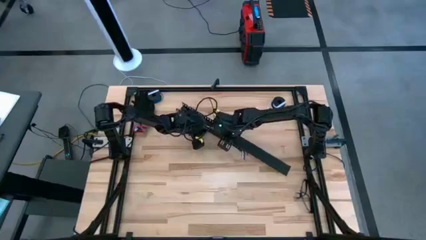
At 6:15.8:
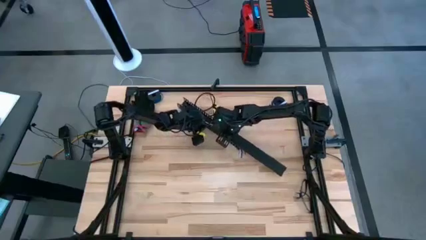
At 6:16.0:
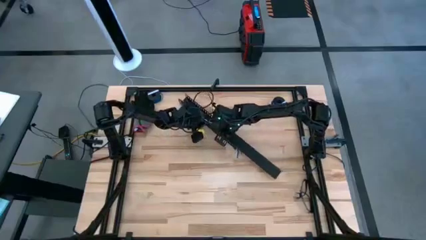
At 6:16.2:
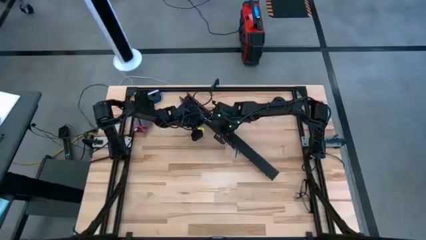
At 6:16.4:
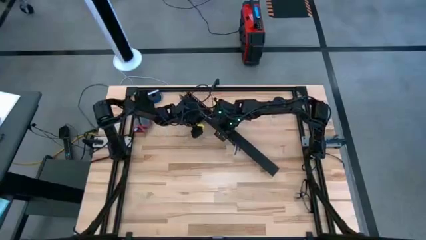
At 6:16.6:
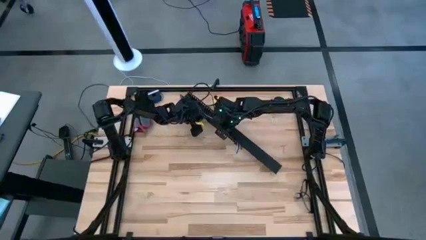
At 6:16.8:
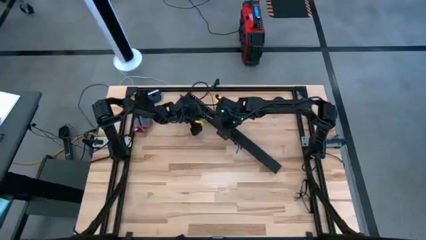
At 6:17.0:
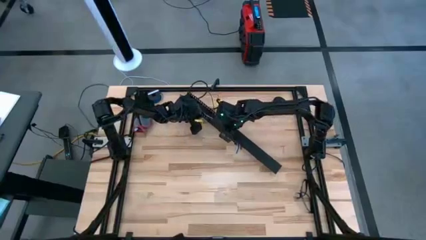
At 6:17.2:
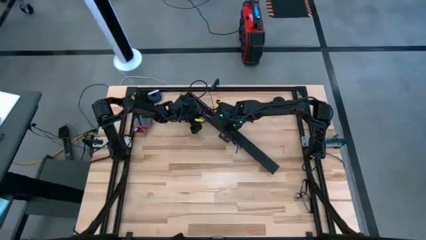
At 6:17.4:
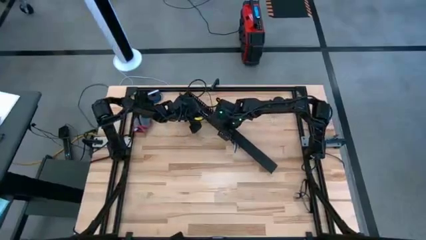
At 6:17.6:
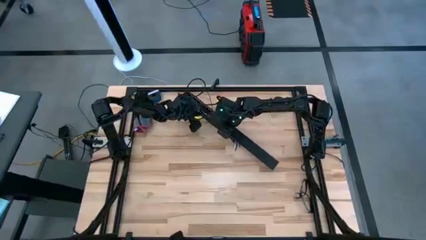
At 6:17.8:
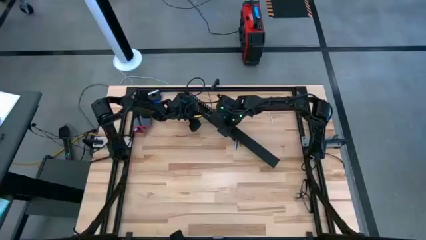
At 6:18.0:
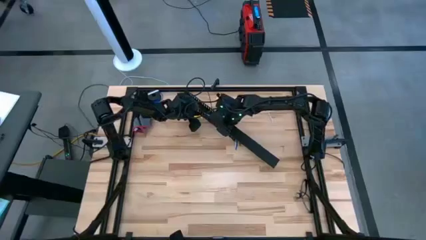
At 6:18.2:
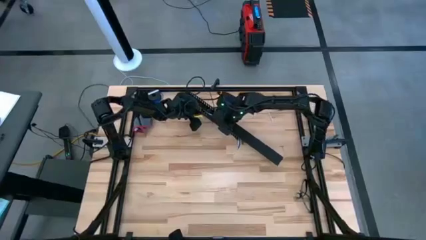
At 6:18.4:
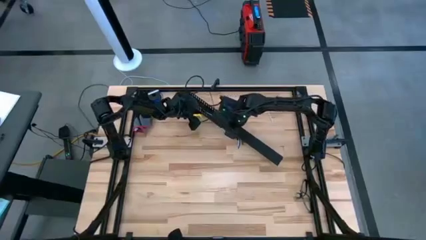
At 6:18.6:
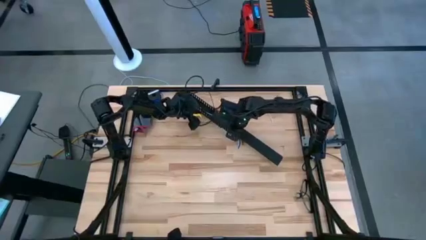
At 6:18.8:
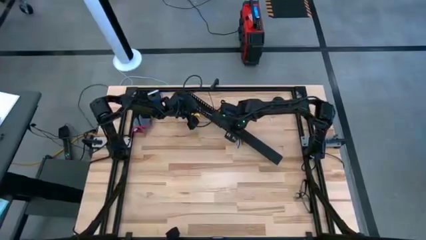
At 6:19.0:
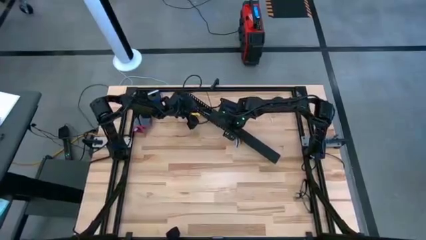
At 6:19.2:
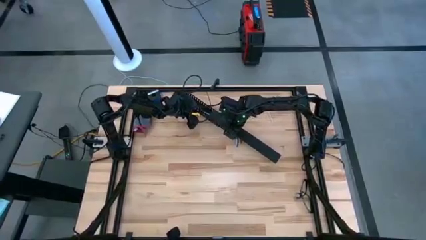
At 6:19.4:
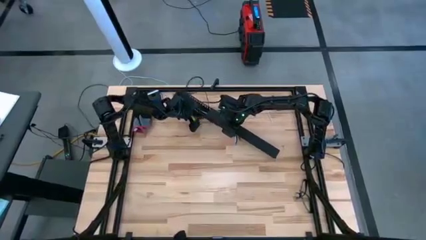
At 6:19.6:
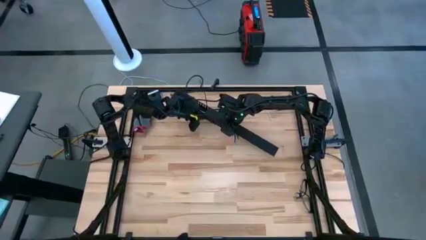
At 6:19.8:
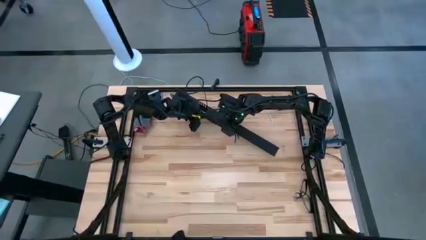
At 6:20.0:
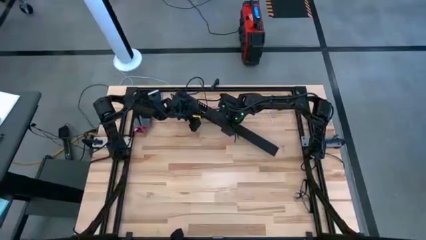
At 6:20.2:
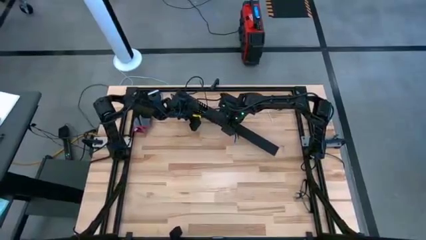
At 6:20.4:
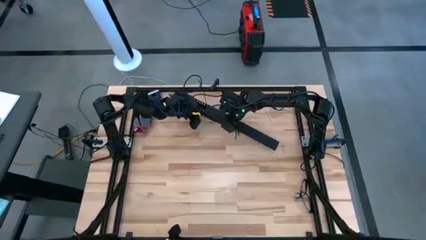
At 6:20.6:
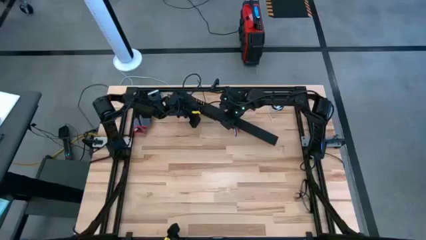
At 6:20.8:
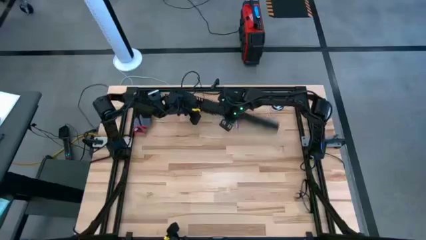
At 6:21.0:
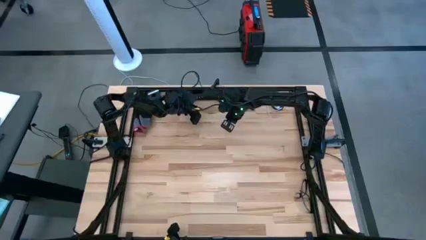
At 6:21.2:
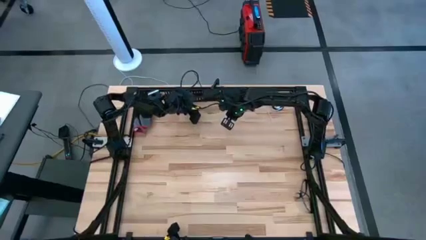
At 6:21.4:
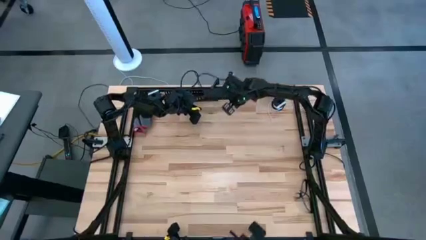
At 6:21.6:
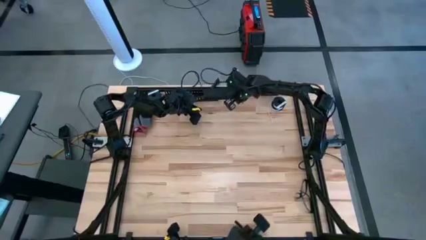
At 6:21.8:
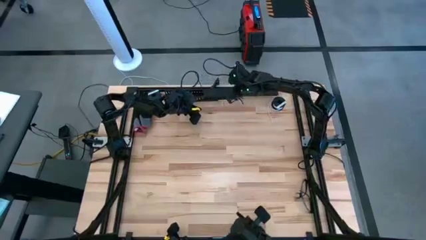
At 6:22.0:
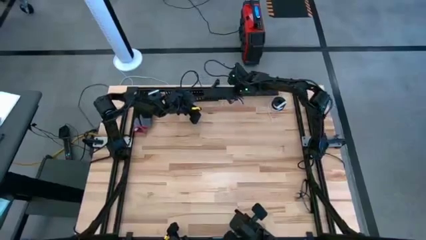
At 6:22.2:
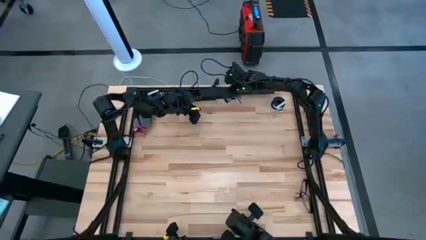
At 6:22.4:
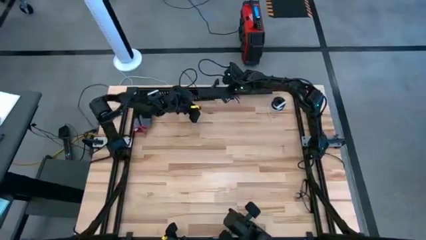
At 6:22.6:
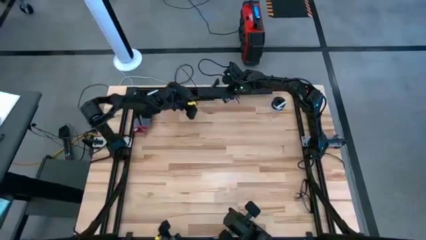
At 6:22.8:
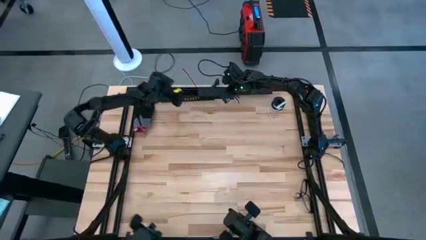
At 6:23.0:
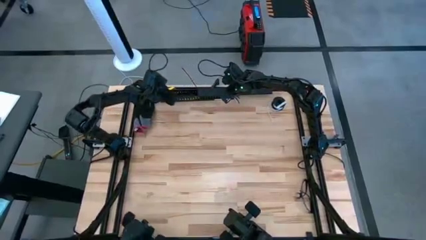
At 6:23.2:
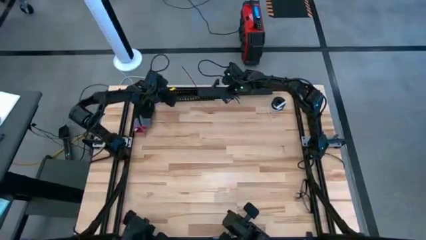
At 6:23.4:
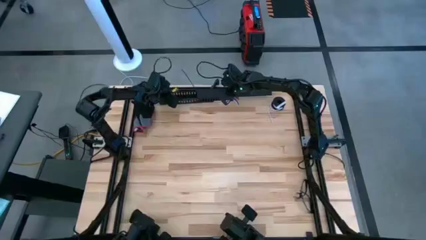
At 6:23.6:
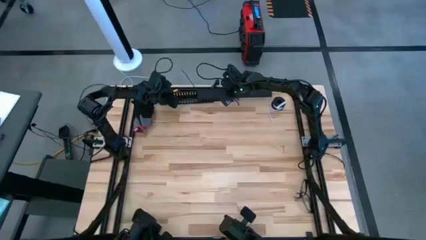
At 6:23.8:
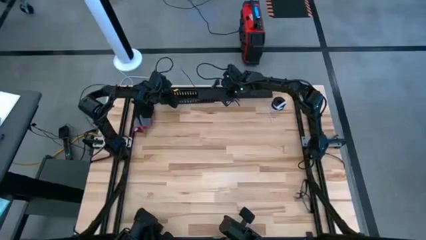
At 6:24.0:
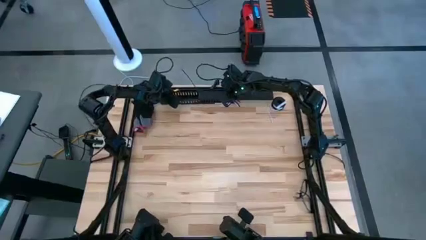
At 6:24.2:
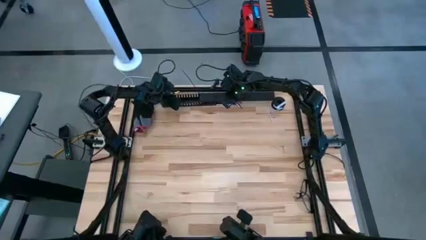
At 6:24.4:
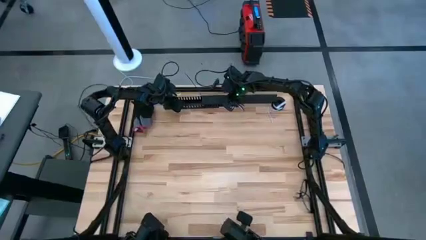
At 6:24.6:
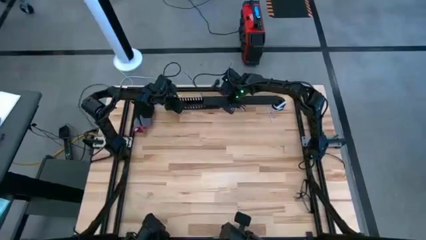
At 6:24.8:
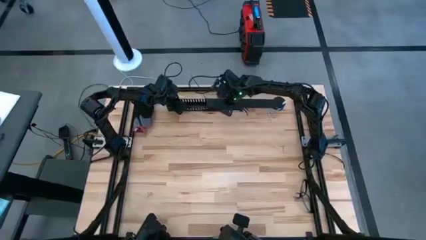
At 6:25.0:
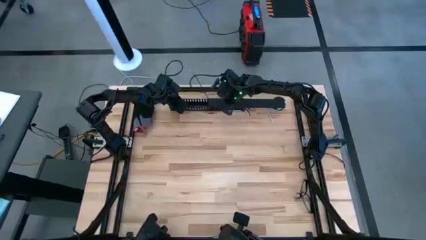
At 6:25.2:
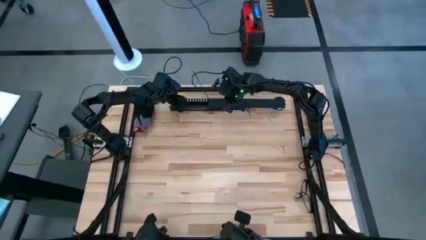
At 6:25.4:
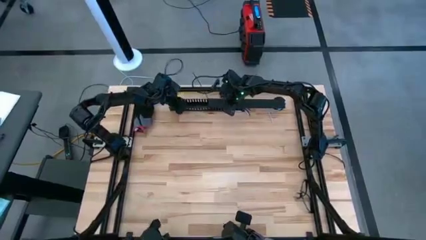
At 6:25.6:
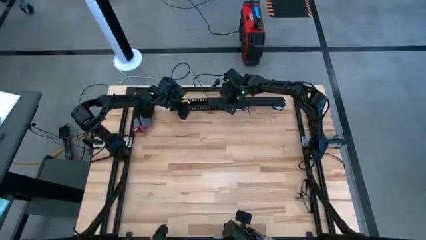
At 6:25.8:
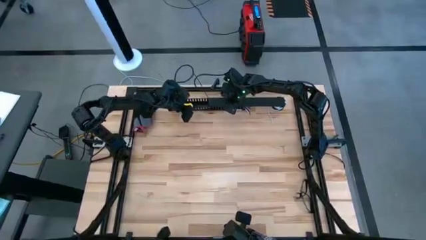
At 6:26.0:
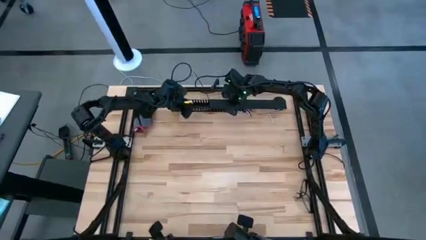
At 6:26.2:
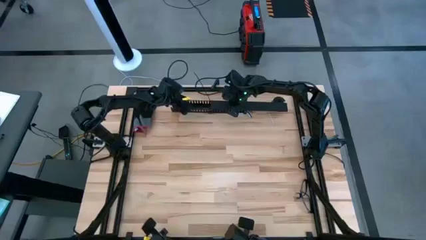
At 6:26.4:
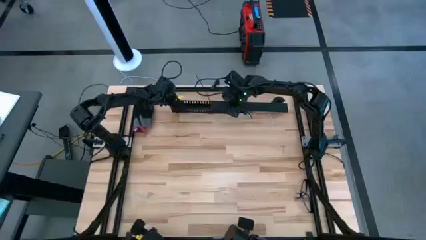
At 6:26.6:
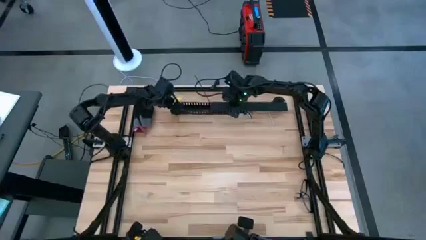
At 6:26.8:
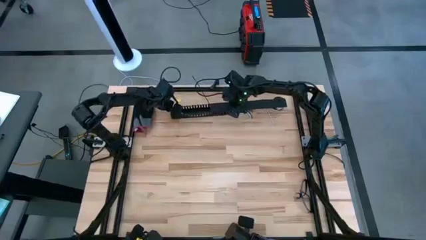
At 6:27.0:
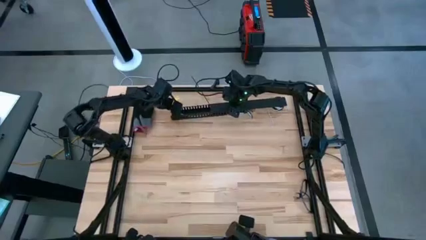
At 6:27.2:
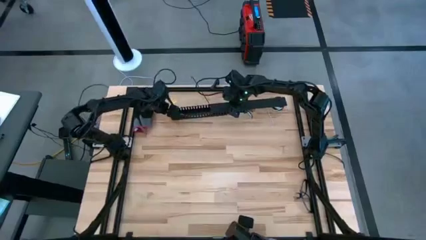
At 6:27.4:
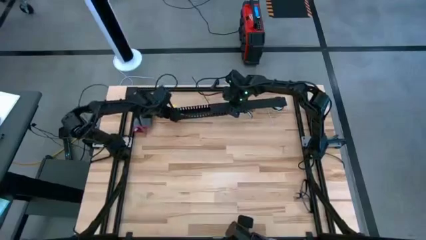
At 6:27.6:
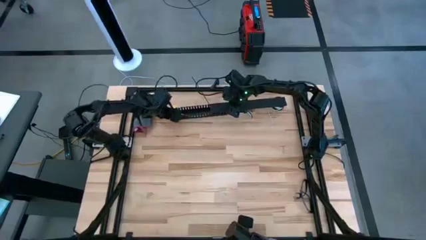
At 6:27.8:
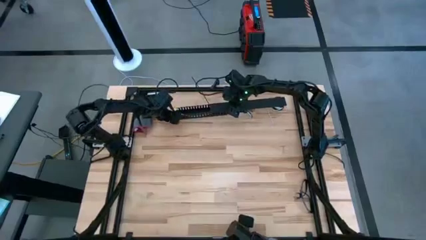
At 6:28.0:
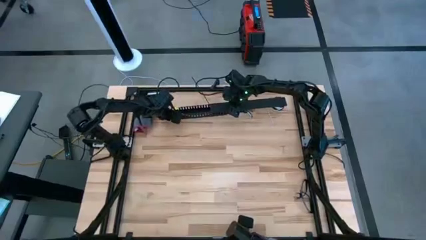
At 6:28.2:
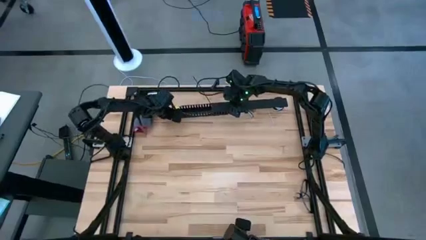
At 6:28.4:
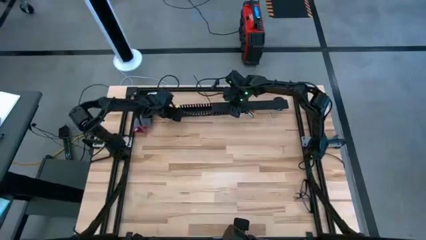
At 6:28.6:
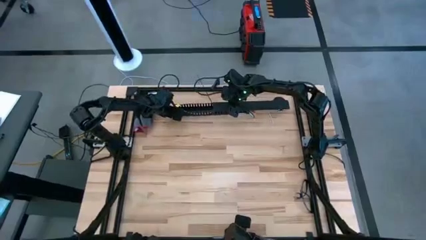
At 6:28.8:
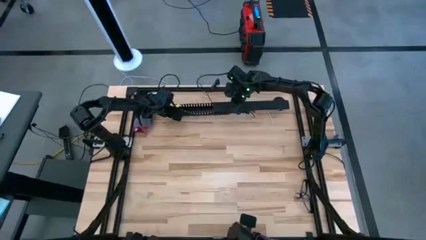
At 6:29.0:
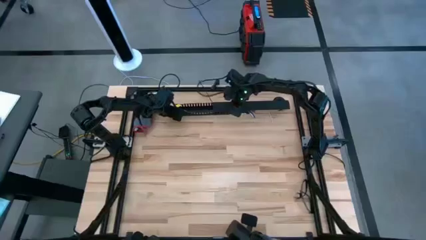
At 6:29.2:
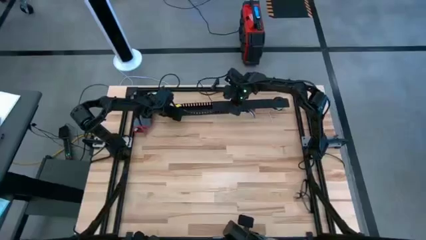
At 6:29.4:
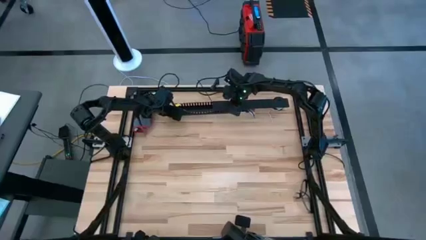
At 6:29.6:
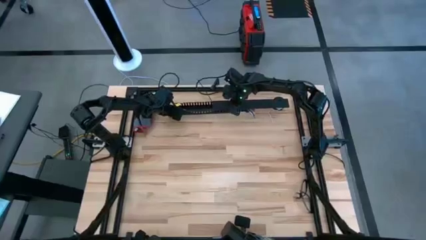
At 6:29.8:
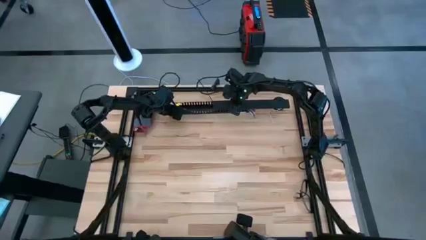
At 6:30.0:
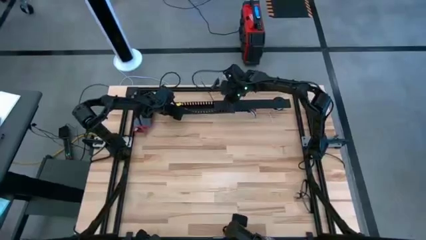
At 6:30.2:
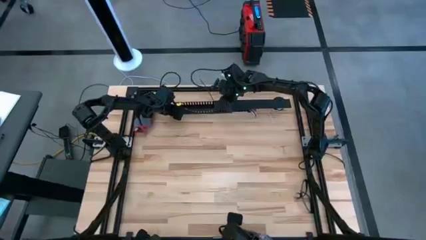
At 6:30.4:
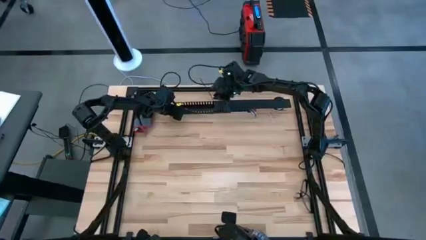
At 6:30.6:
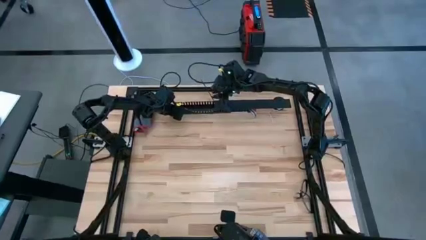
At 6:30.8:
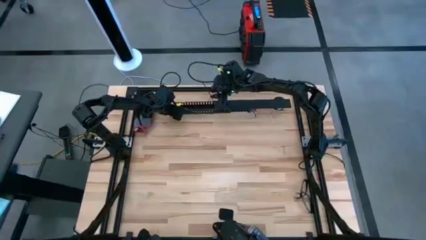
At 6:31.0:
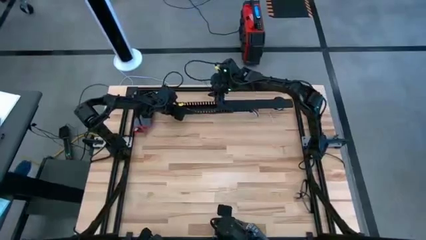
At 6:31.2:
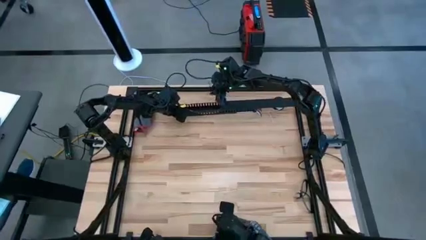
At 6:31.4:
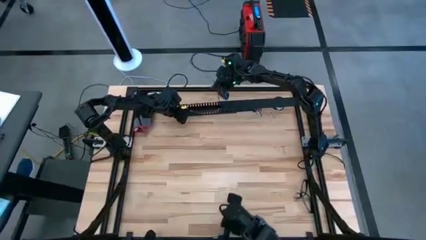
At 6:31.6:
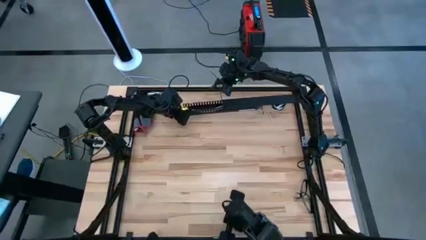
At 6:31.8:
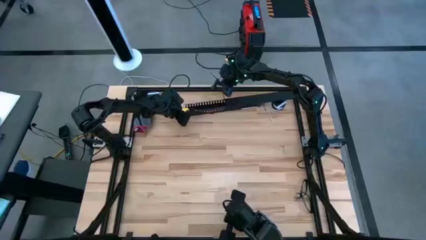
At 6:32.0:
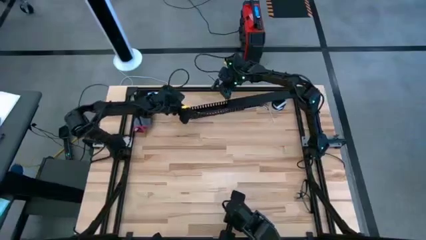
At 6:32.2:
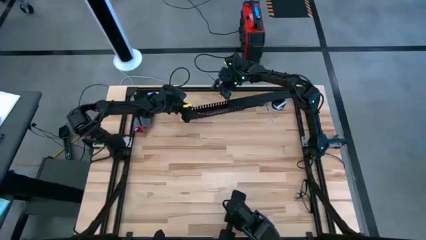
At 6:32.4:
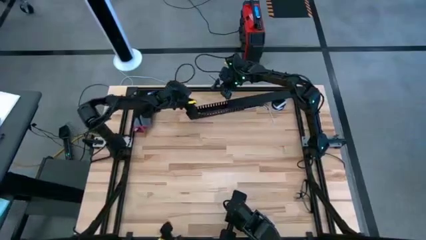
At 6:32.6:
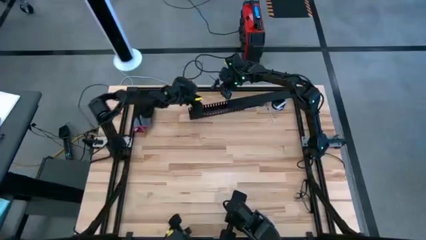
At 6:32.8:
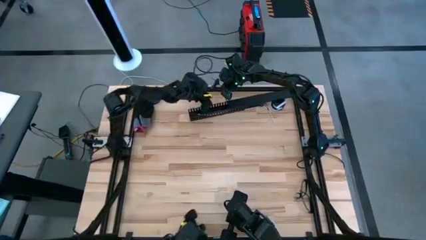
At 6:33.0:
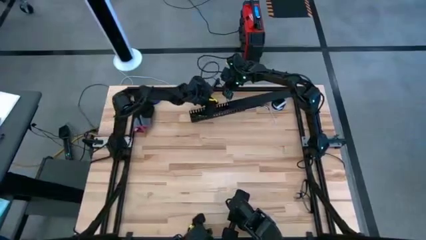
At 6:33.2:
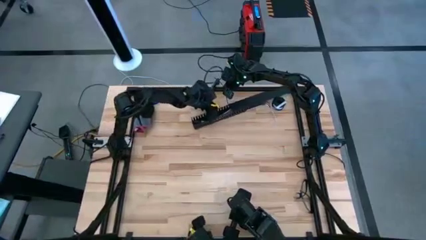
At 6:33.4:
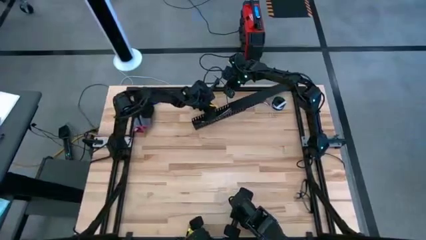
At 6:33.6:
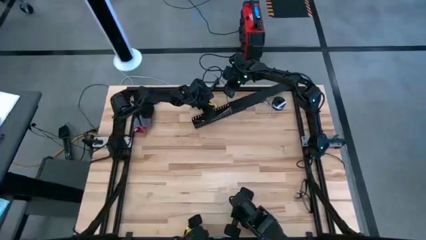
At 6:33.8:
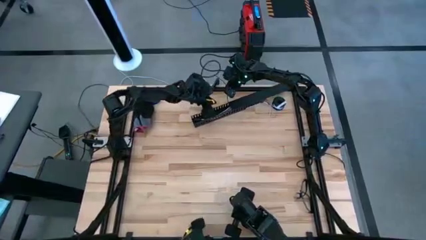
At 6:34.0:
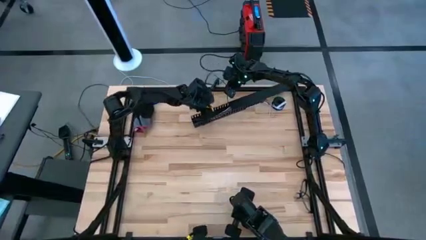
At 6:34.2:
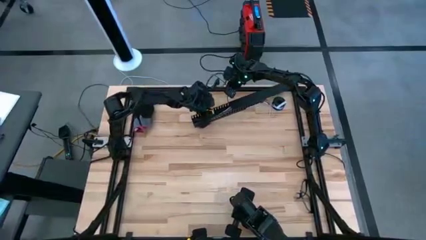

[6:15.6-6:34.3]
Task: Ziptie cables
Close the black cable duct
